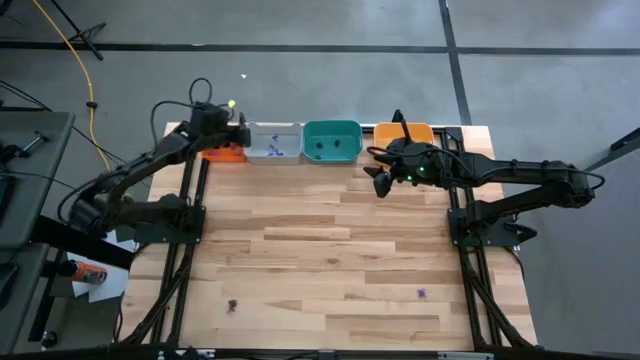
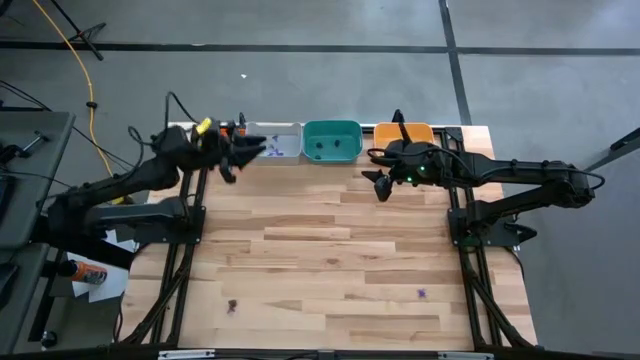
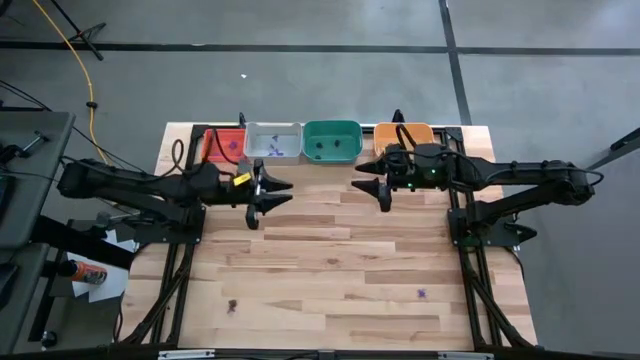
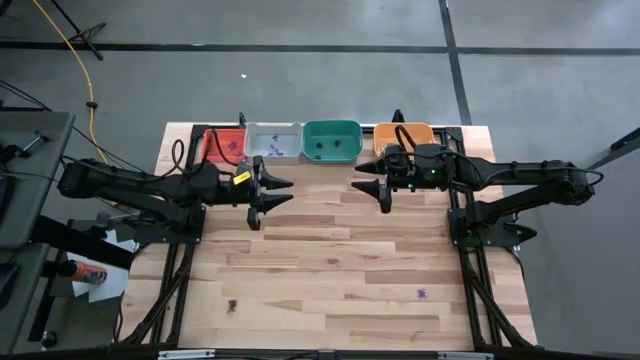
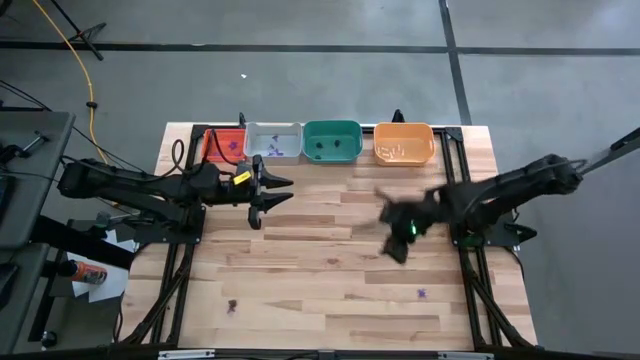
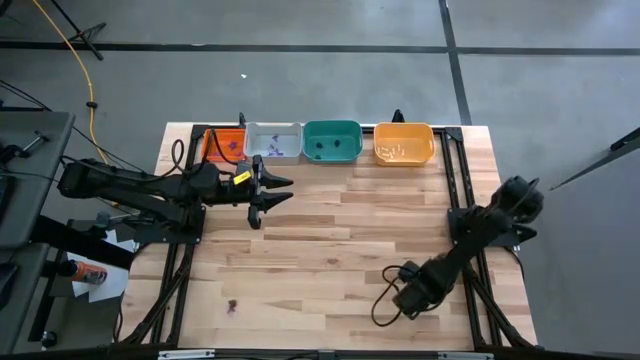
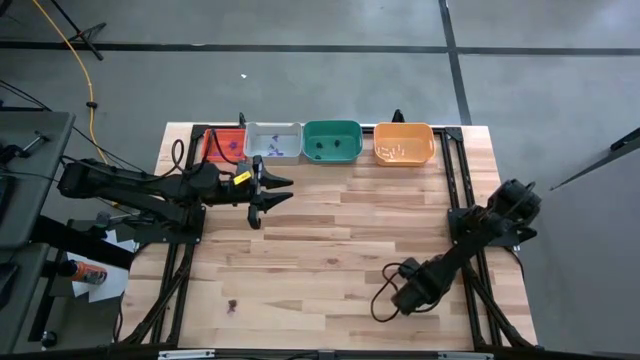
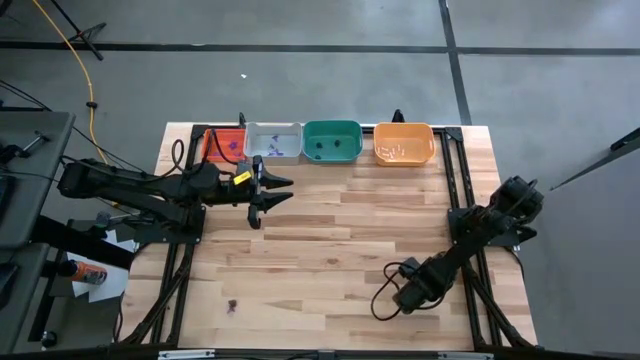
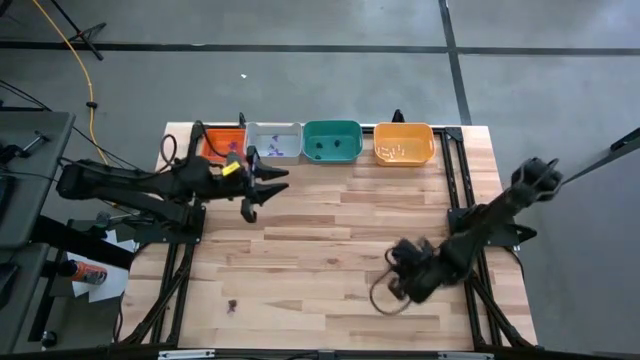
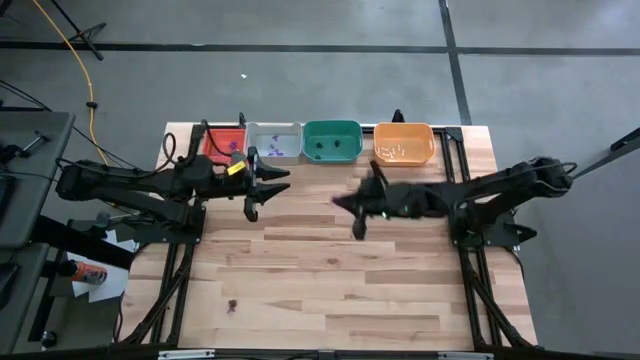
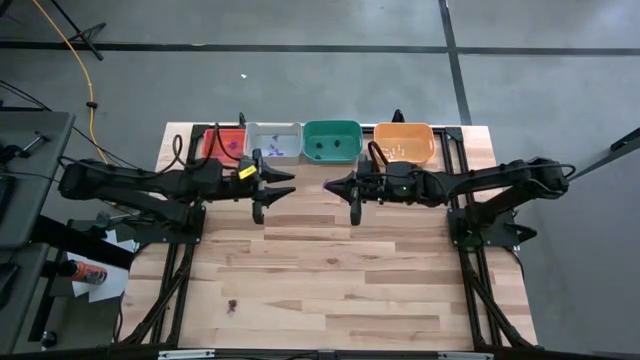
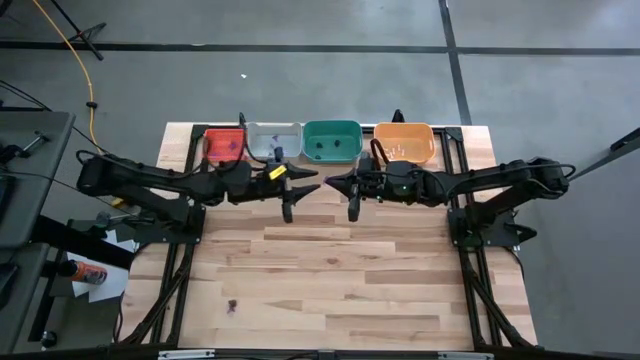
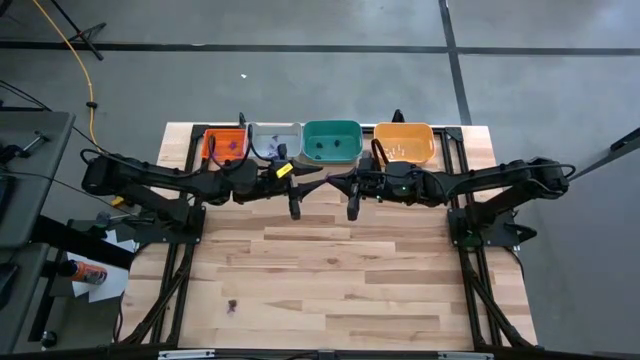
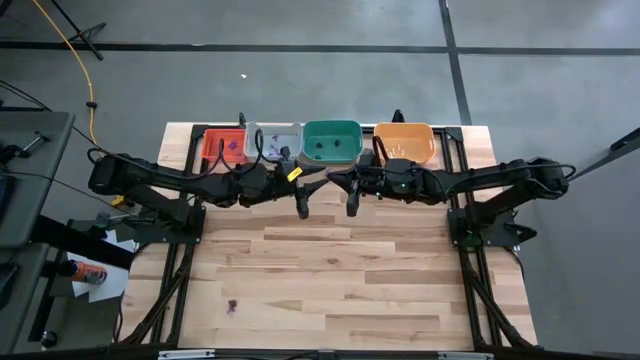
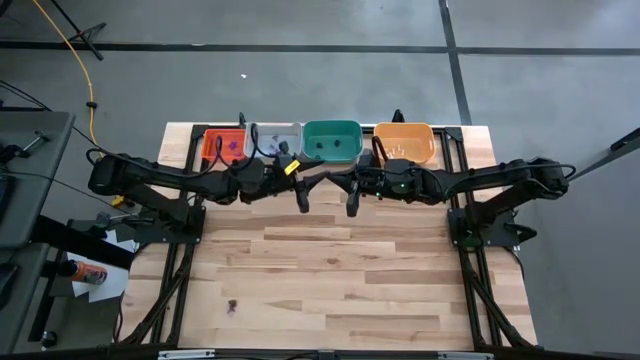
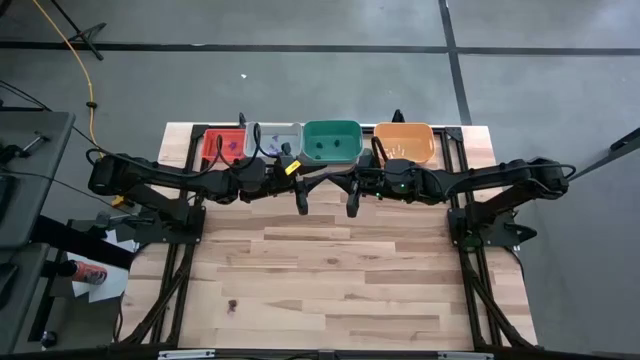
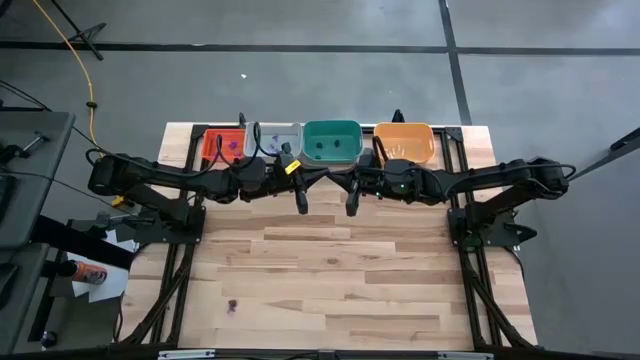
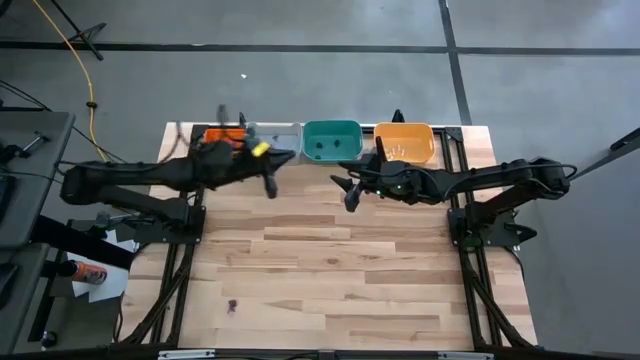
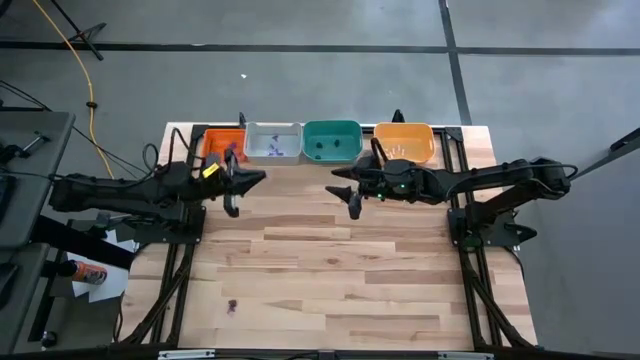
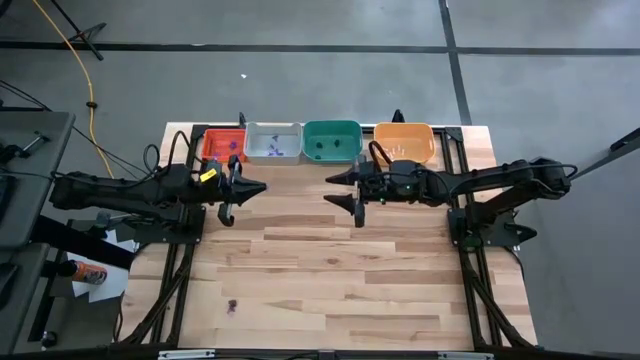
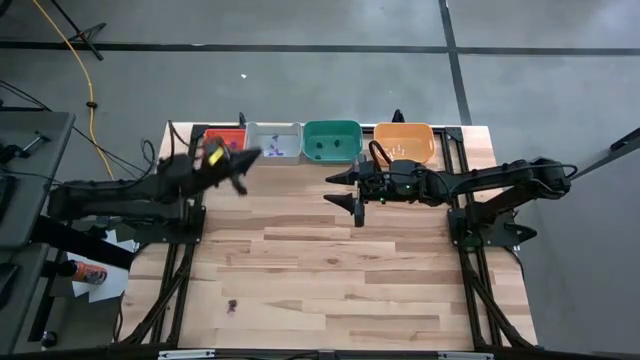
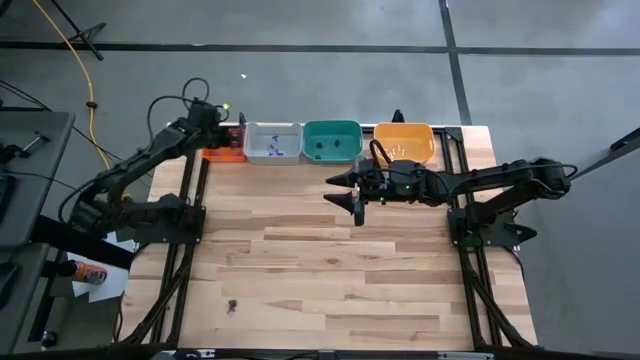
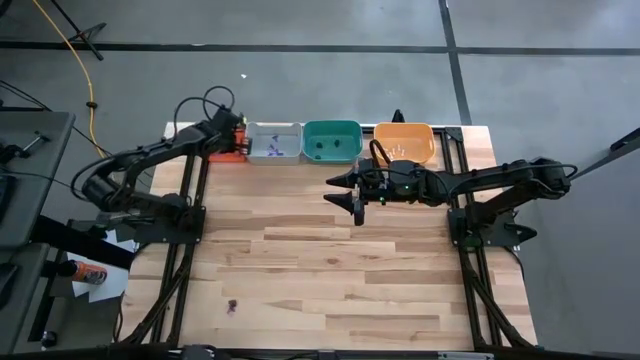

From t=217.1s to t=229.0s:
Task: Sort Halloween decoration
Put the violet spider into the orange bin

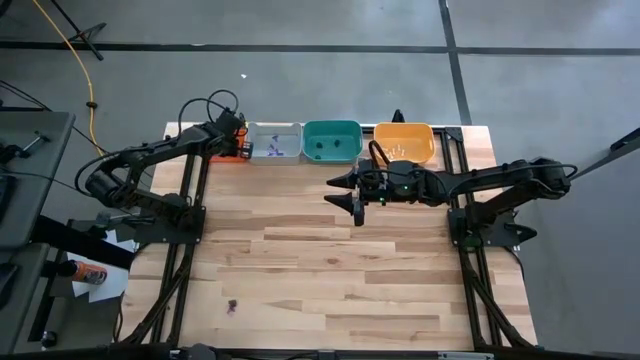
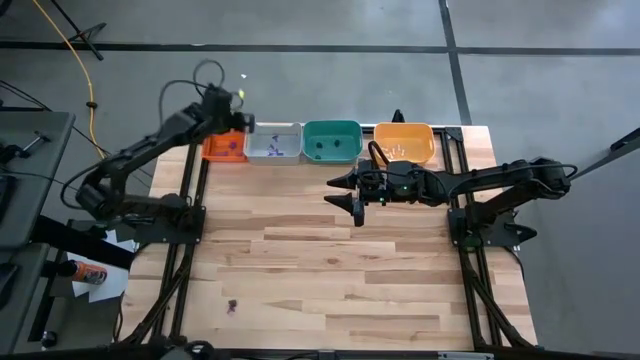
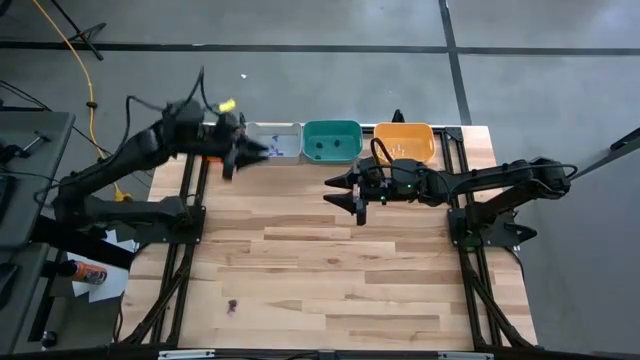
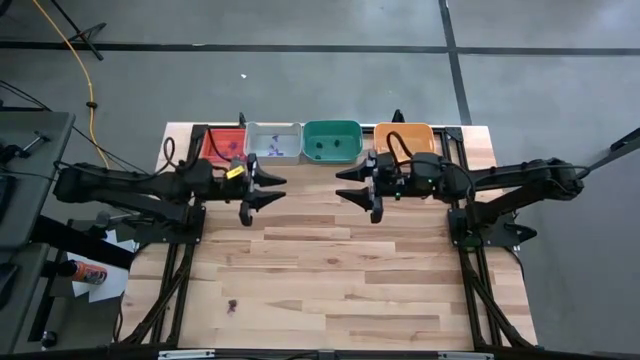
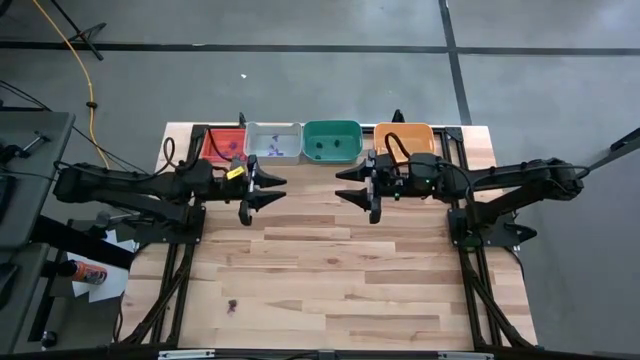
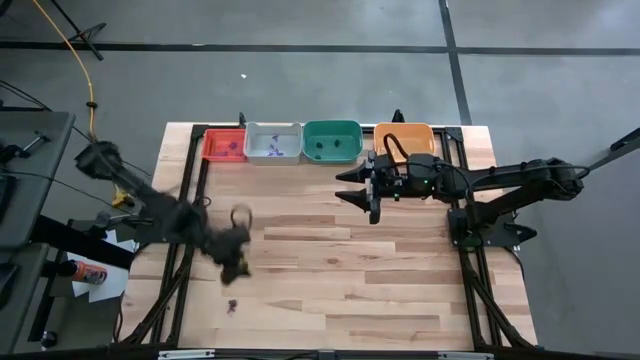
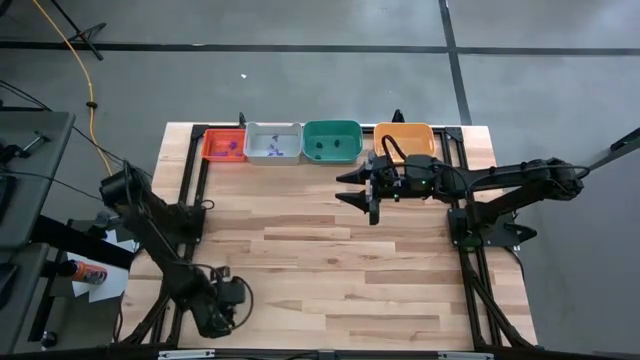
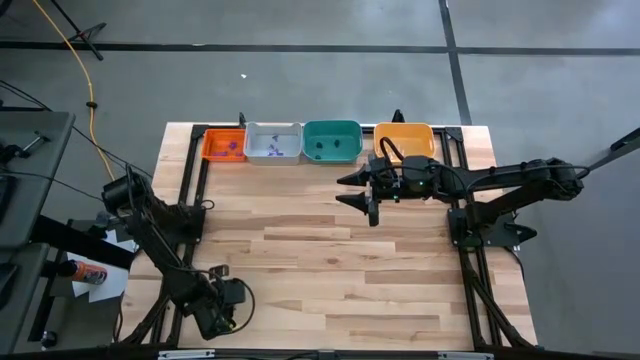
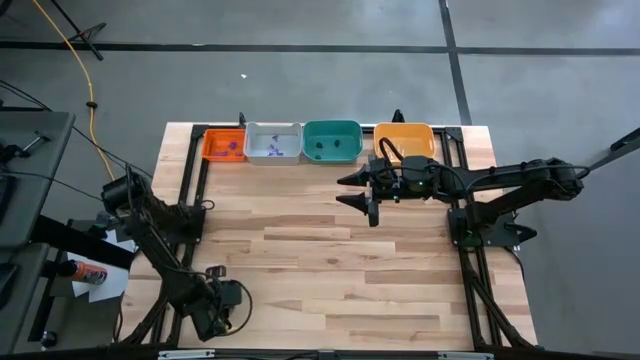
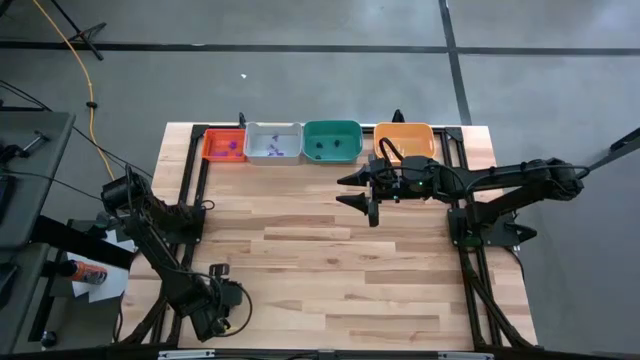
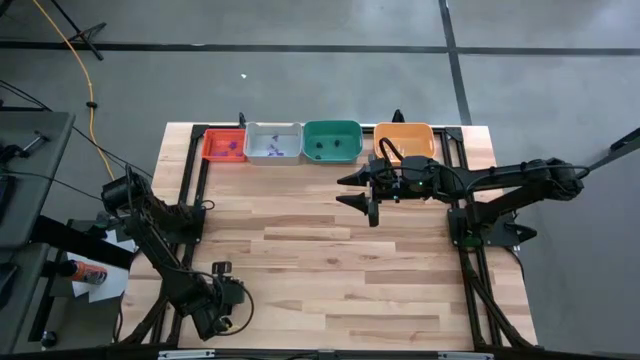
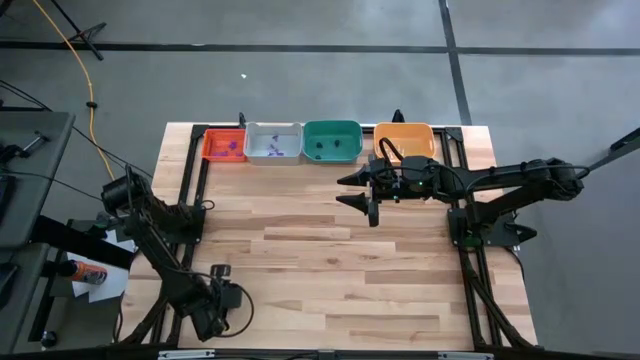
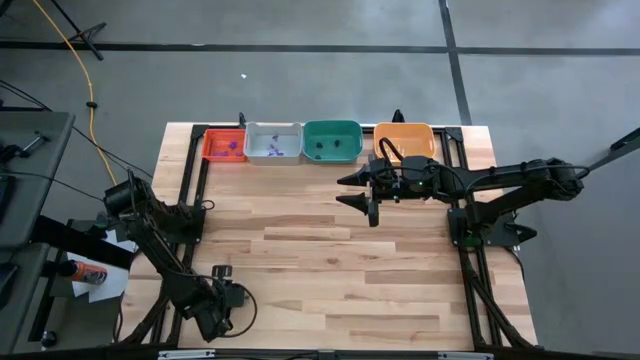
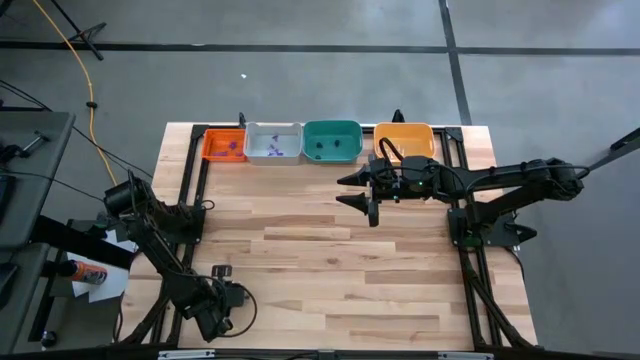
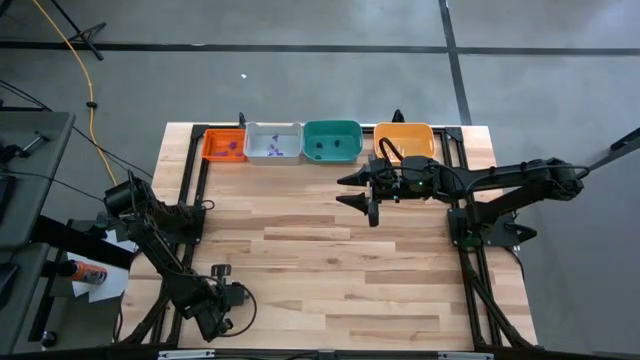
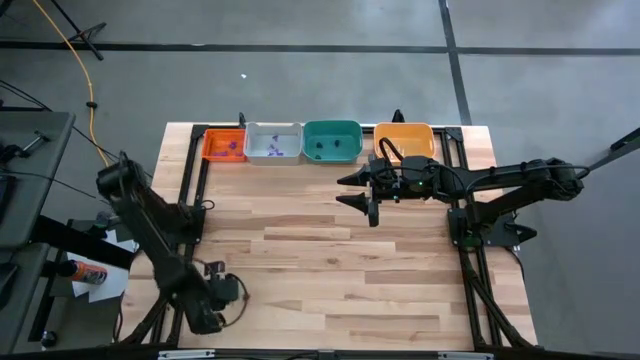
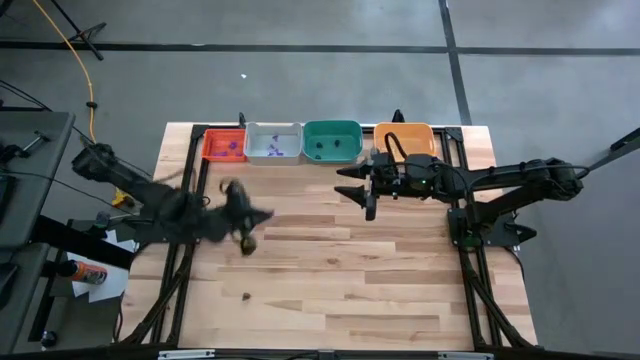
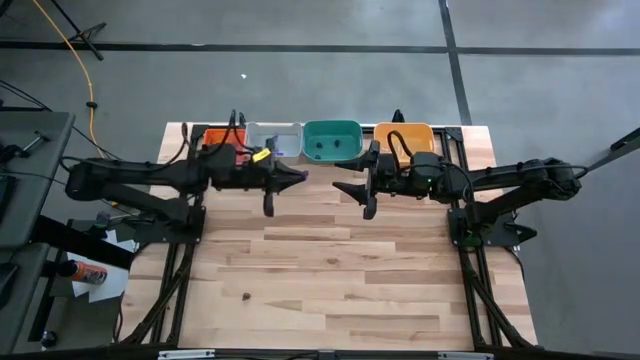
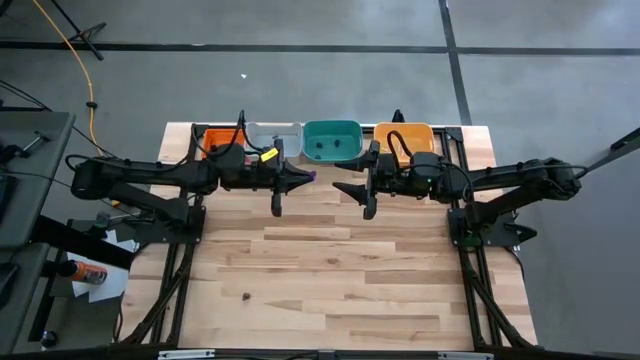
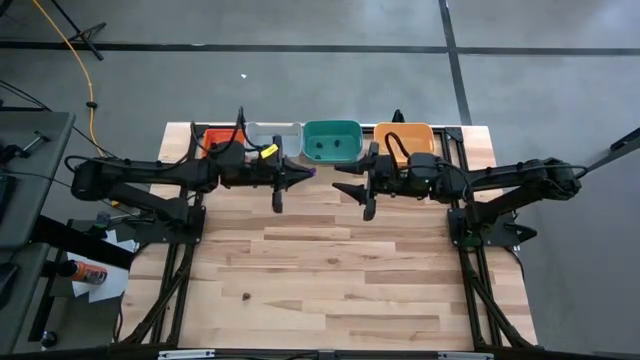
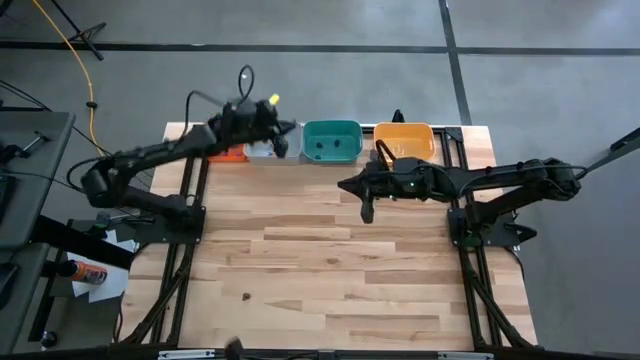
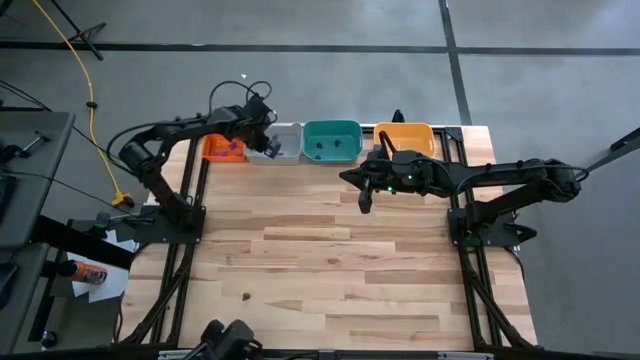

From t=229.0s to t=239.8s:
Put the violet witch hat into the gray bin
